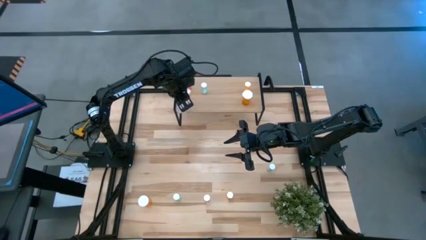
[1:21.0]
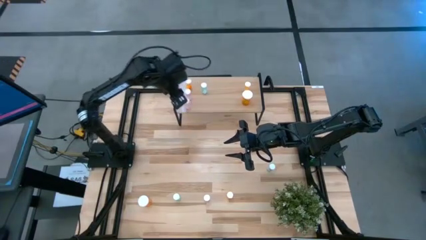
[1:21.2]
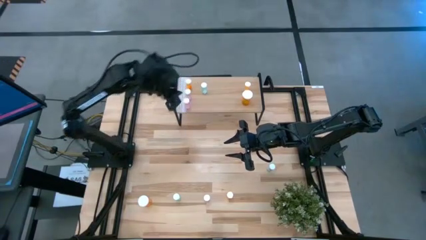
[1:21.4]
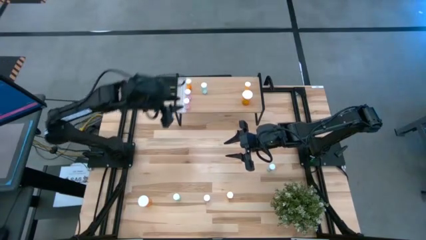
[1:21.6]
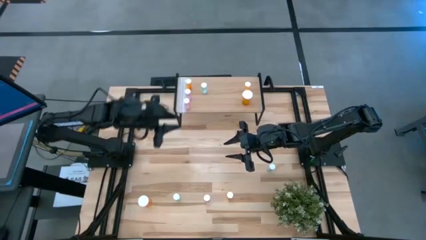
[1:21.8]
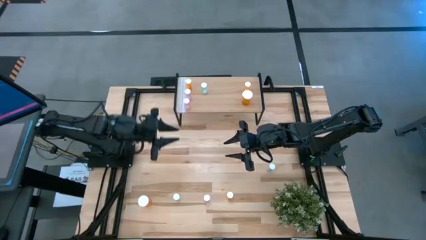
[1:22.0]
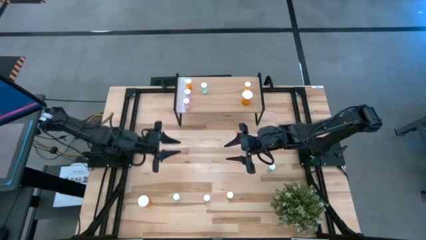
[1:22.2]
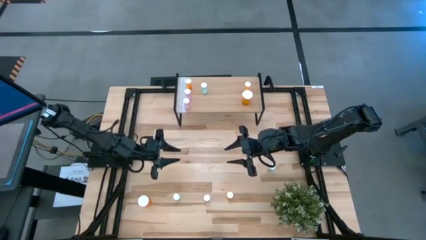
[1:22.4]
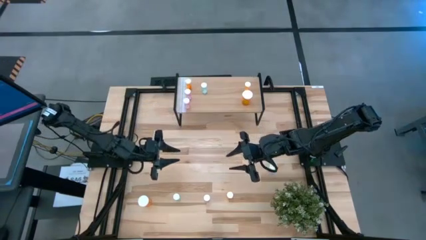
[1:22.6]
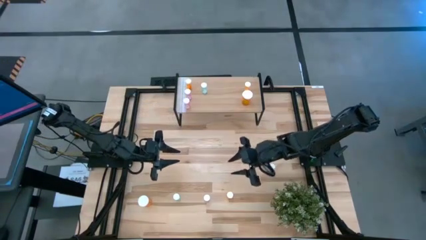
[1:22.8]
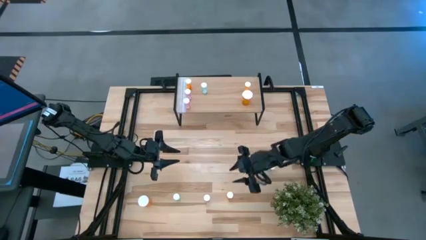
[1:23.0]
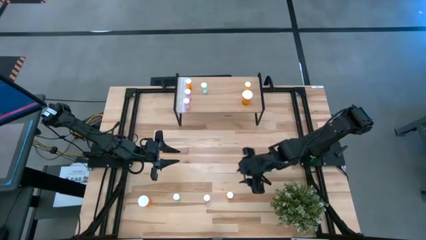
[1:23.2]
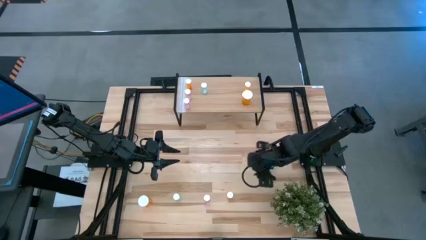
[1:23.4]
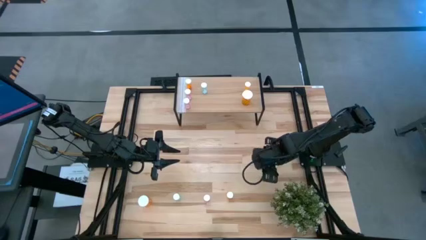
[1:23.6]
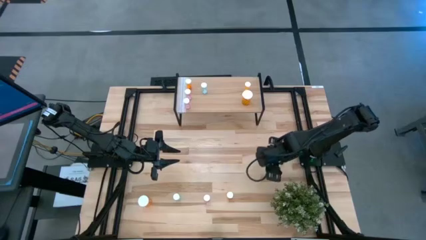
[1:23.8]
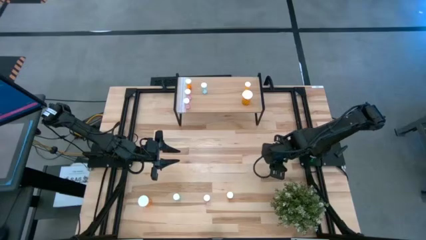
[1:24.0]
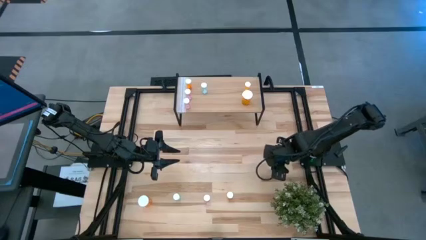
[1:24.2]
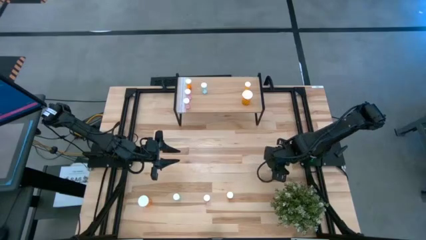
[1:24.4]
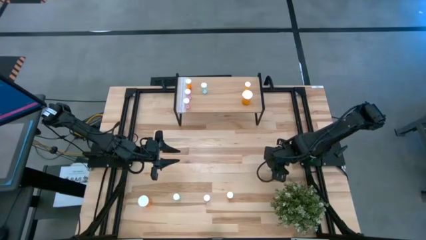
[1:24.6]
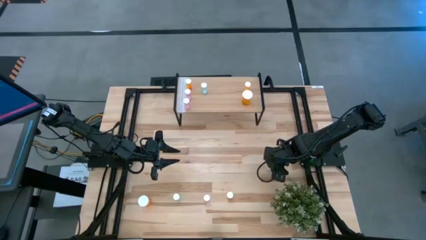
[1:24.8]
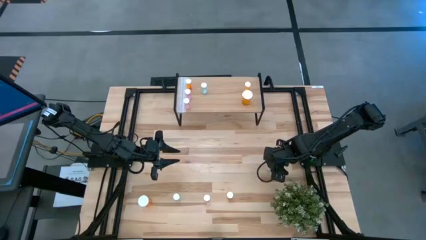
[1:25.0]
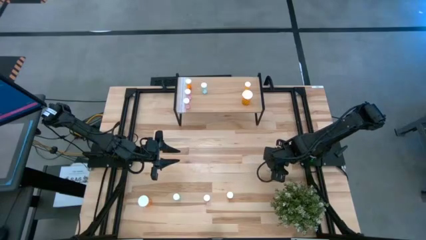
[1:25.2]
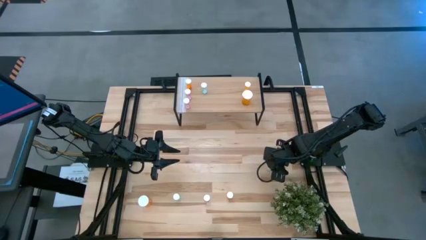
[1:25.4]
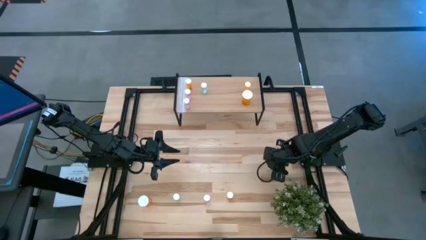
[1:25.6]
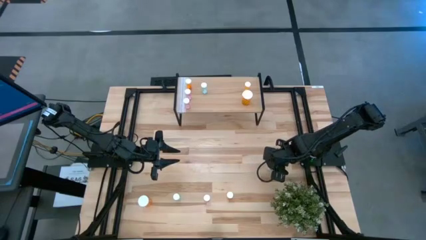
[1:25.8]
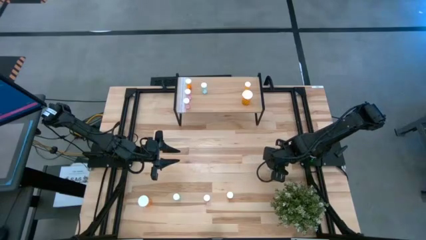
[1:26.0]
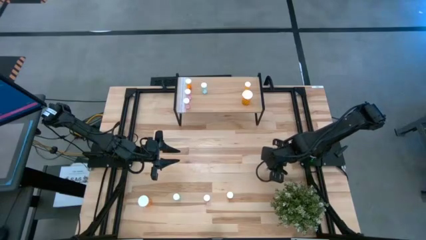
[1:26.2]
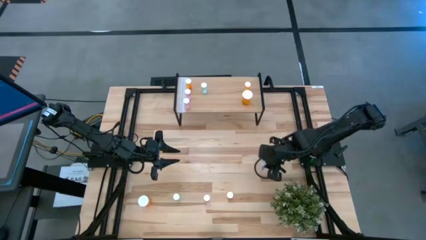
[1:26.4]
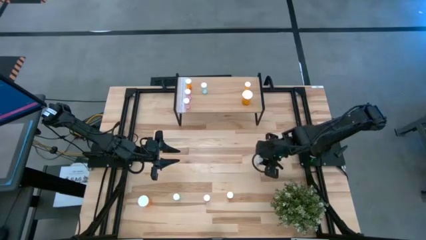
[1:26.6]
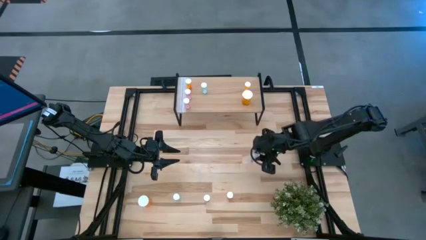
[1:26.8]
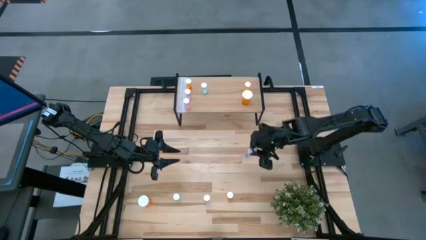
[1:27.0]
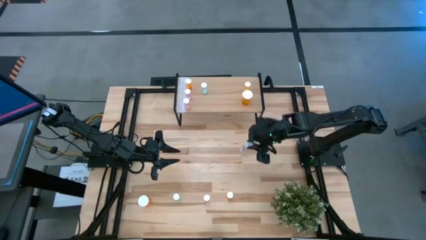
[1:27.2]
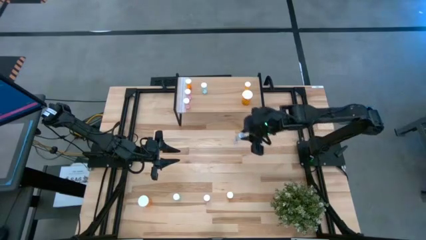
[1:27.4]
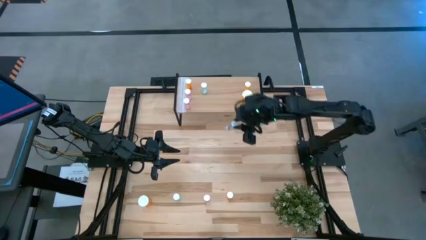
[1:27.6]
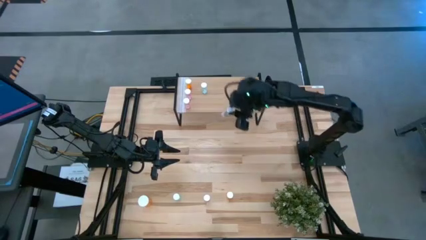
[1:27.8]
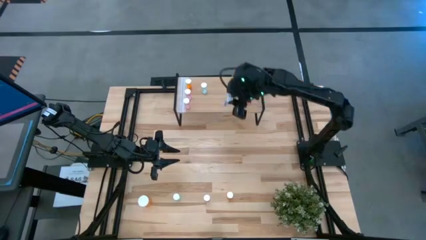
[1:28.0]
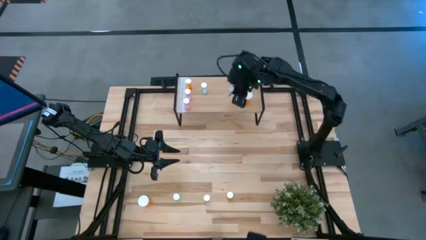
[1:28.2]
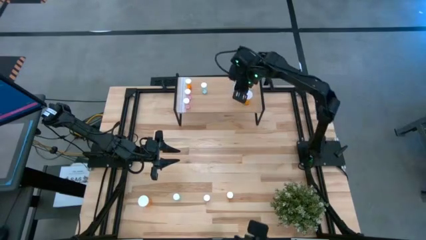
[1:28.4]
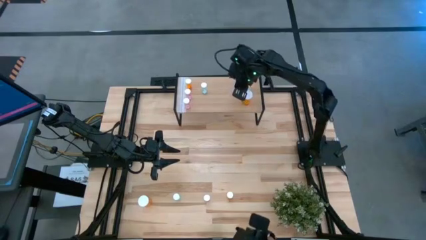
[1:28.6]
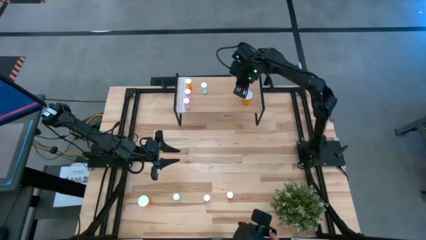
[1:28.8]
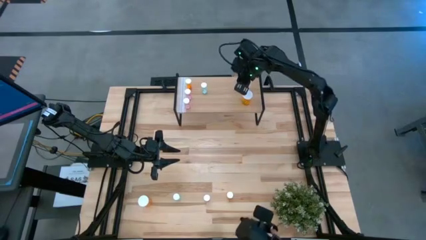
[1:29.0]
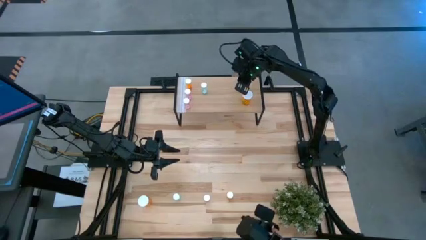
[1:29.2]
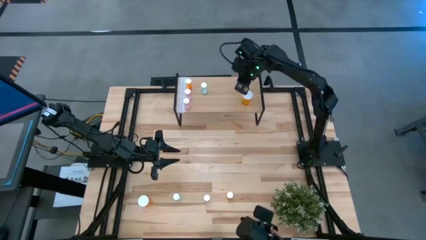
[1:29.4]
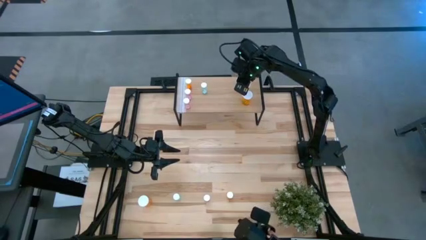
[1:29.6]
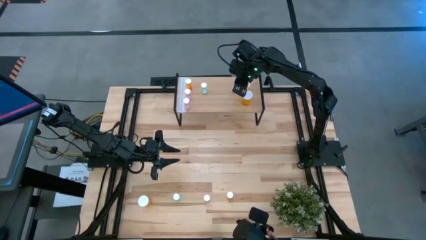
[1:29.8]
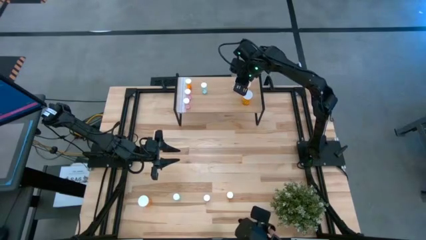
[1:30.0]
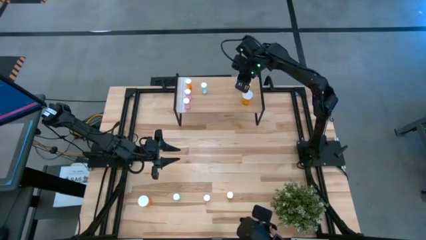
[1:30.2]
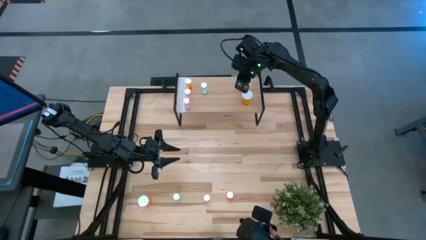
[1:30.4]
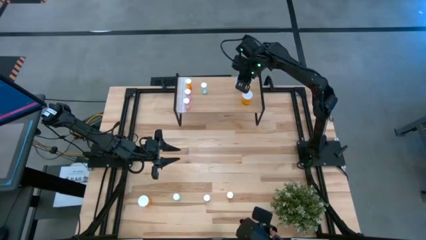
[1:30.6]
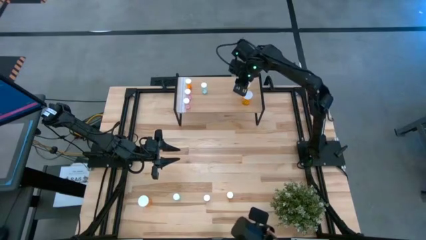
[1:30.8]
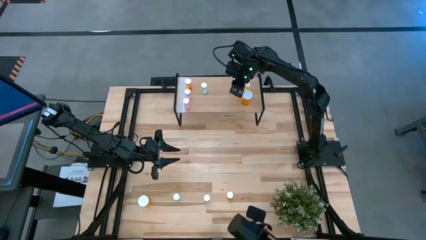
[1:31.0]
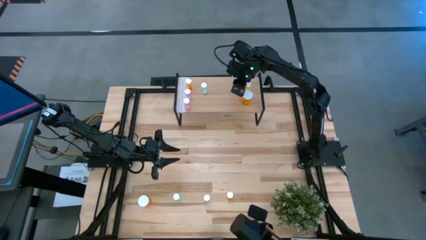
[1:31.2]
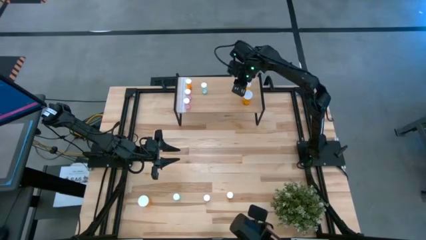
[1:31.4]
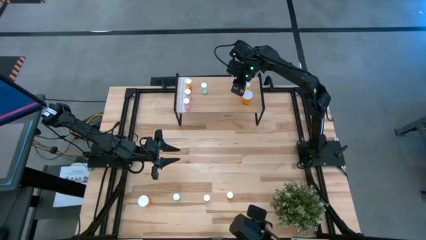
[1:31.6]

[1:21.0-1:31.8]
Task: Pick and place medicine bottles onto shelf by color
Put the top blue pill bottle on the shelf

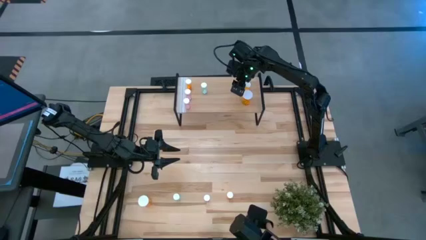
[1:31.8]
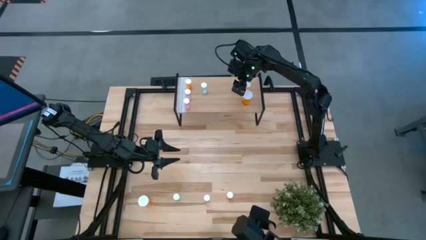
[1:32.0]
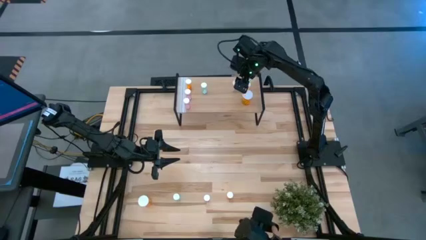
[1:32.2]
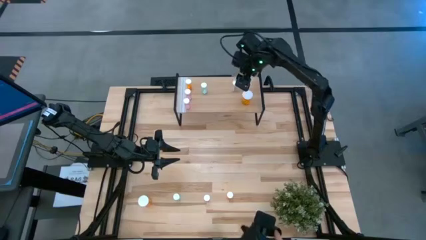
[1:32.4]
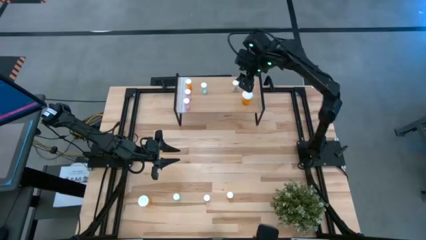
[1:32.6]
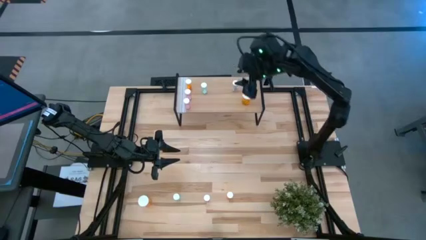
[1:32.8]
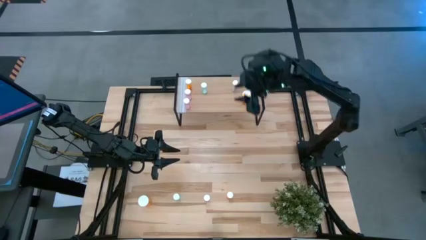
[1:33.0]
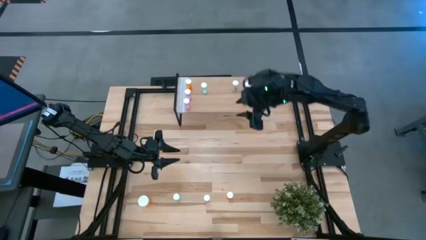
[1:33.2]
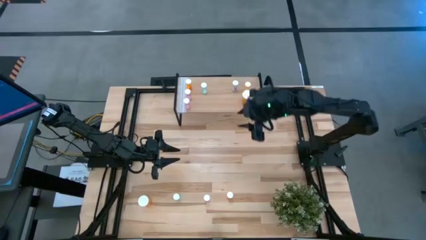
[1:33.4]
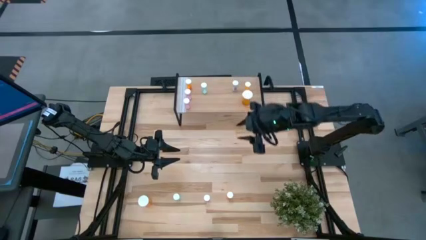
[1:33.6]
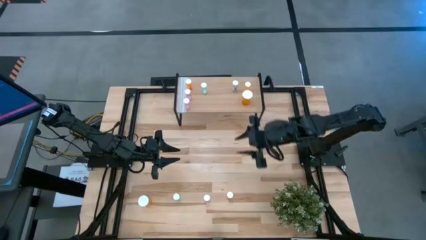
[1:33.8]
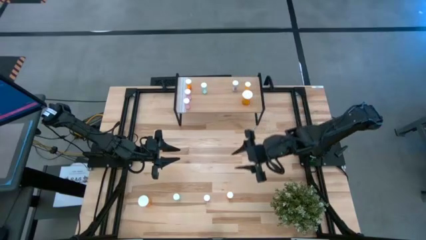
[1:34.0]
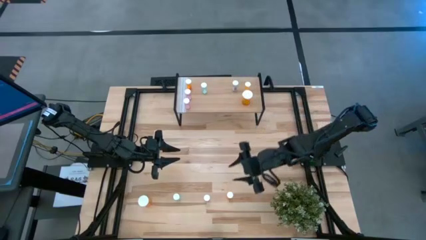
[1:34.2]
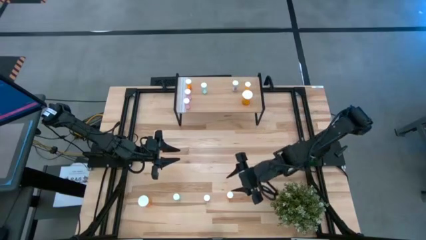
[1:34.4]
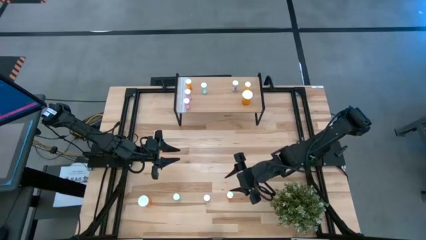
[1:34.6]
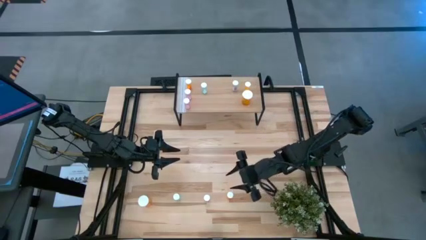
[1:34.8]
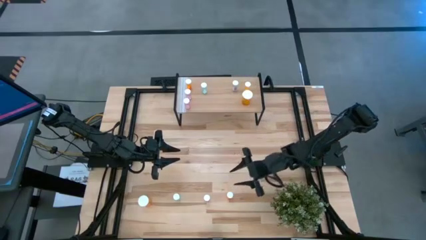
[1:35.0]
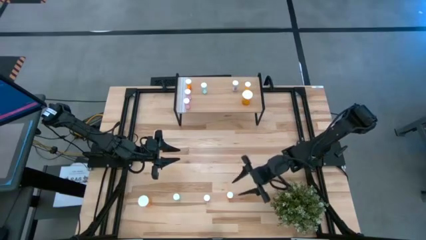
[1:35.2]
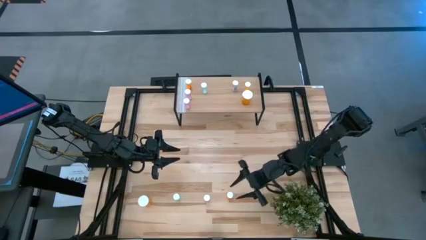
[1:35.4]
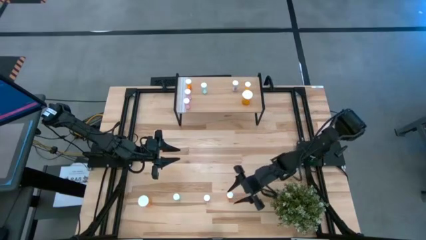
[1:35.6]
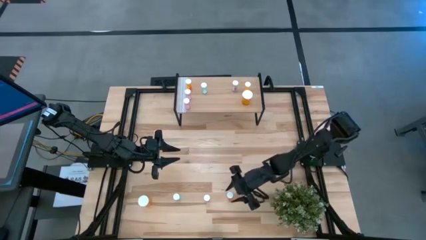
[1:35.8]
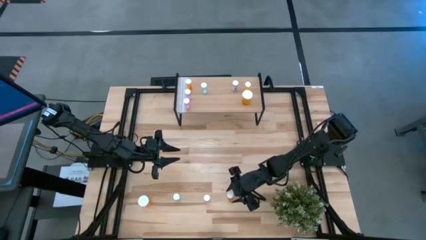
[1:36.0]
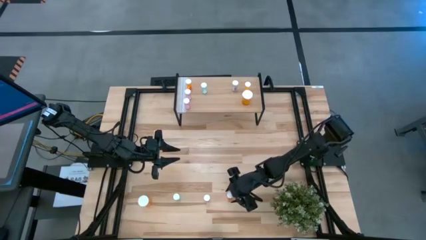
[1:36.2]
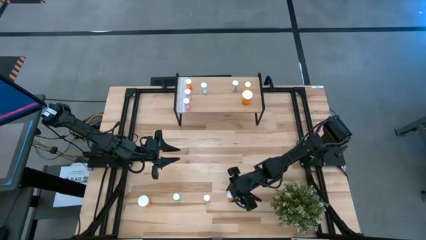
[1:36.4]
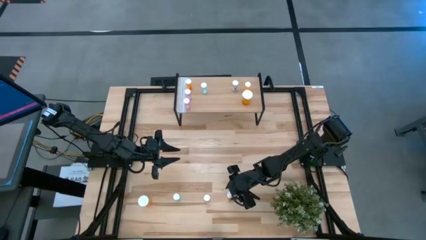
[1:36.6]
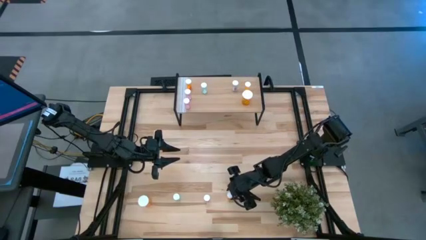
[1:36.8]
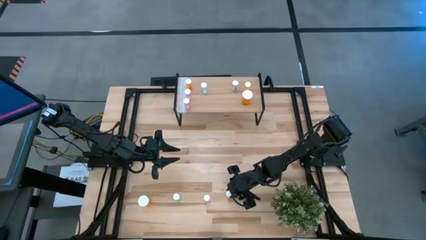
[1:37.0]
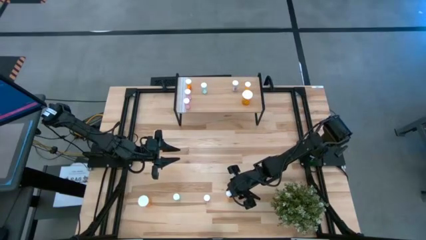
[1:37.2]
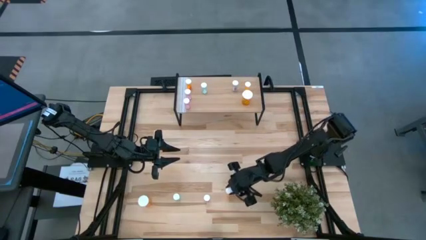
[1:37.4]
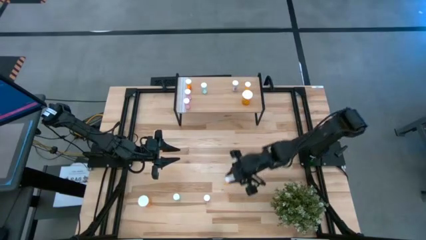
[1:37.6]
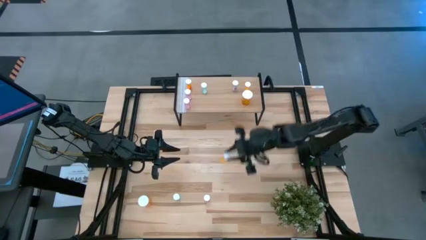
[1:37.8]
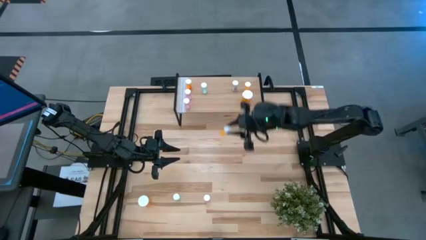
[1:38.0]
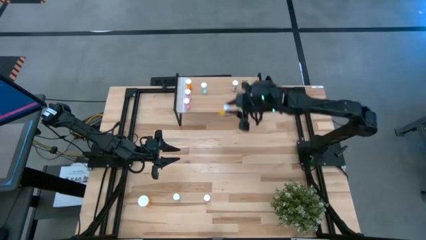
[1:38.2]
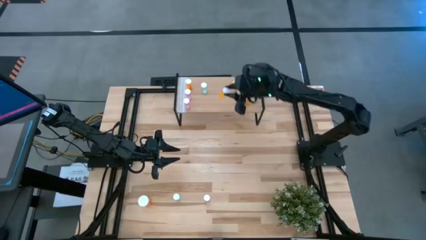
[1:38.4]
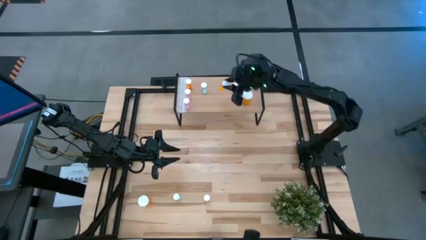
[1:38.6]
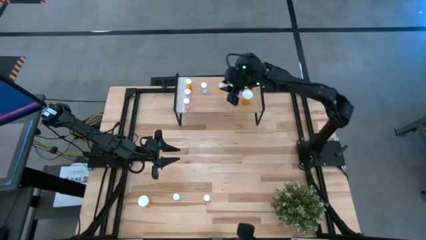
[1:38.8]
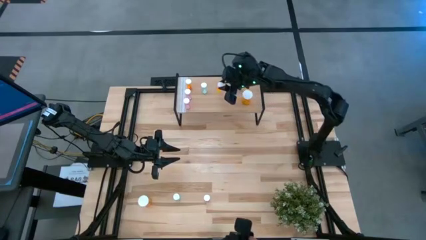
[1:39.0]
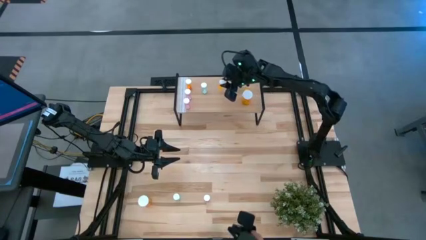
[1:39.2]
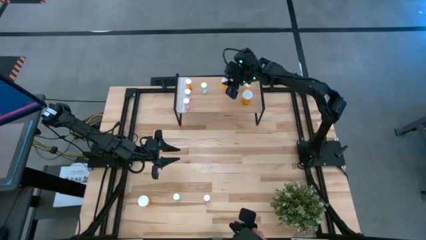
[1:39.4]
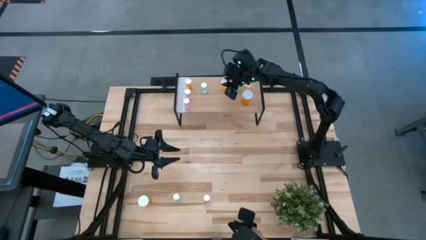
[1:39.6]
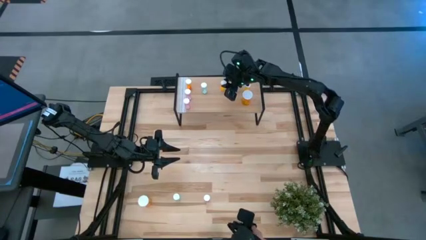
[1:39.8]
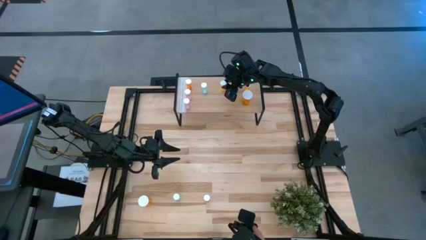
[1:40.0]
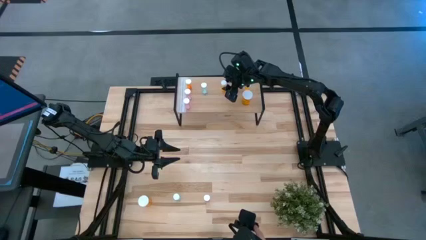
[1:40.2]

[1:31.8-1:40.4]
Put the small orange pill bottle on the shelf
